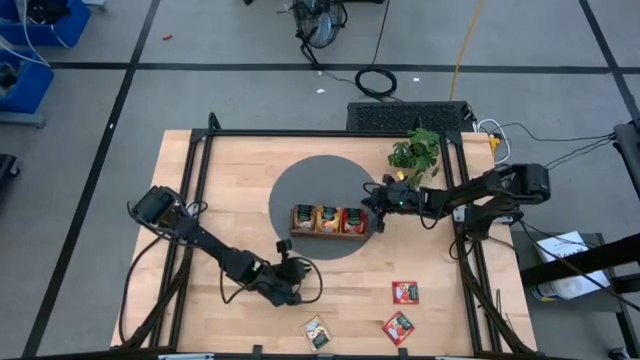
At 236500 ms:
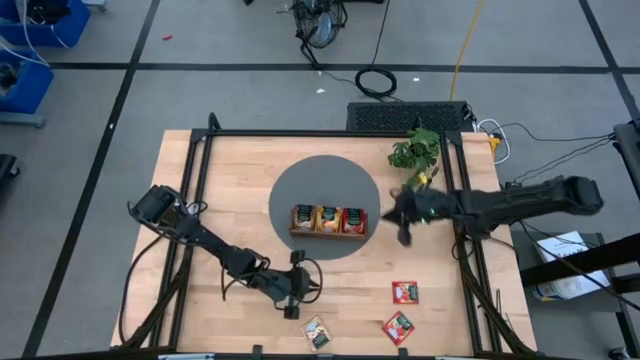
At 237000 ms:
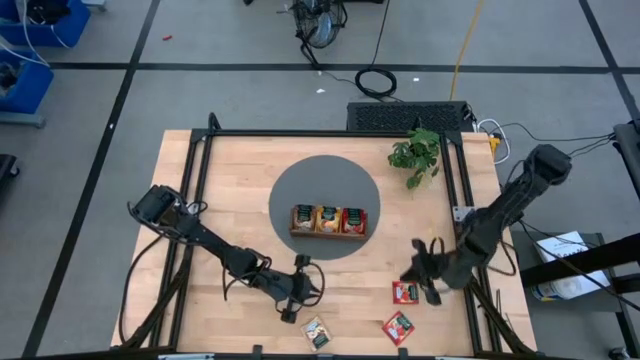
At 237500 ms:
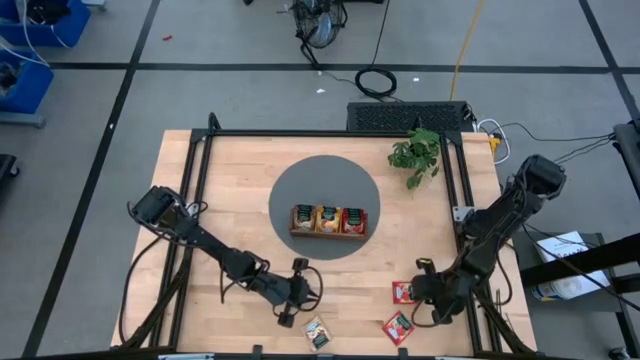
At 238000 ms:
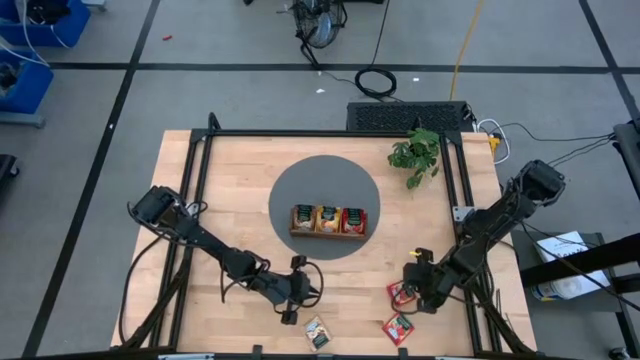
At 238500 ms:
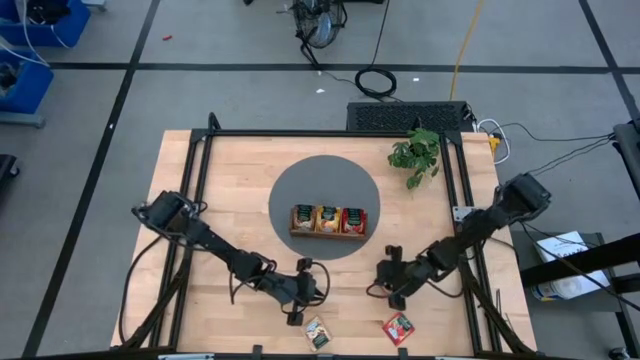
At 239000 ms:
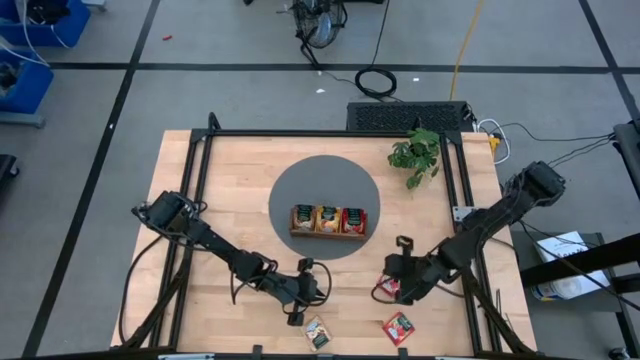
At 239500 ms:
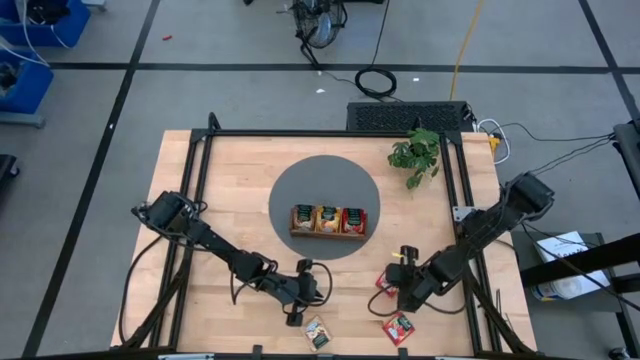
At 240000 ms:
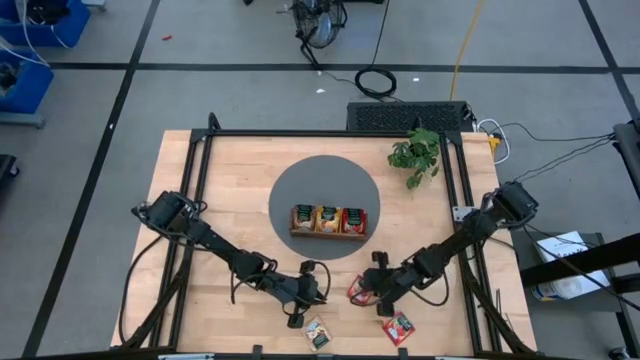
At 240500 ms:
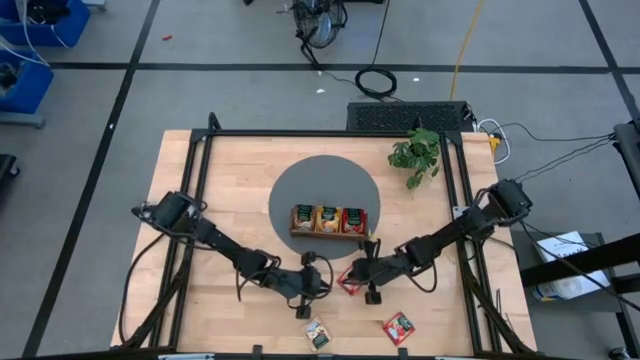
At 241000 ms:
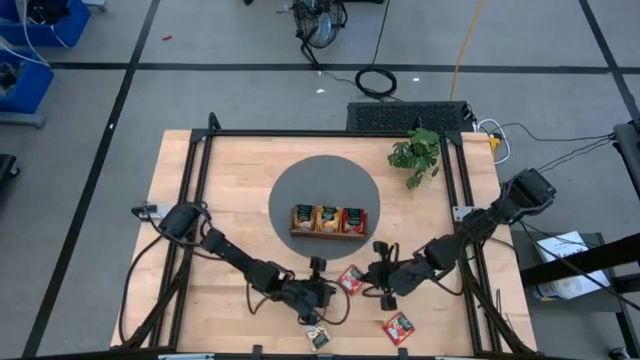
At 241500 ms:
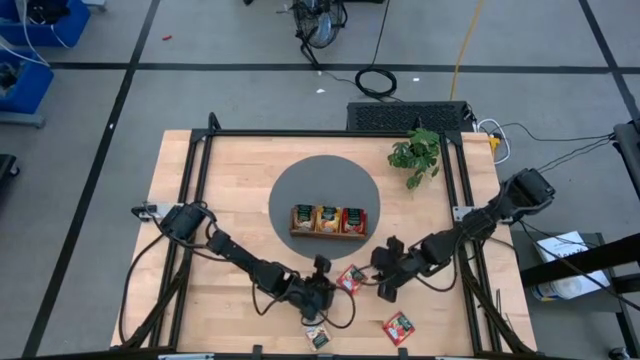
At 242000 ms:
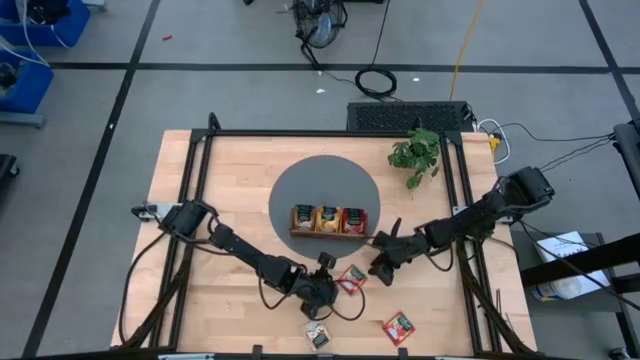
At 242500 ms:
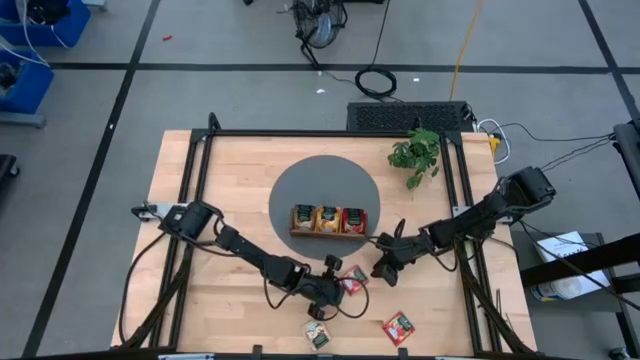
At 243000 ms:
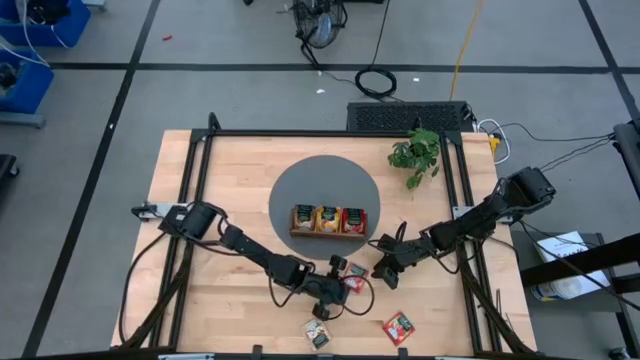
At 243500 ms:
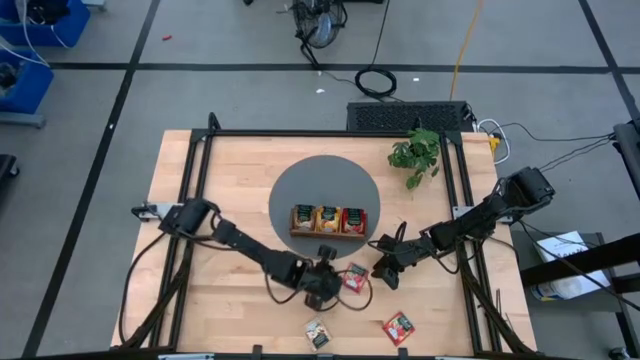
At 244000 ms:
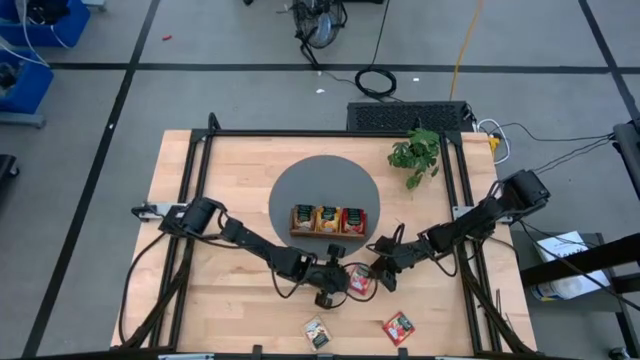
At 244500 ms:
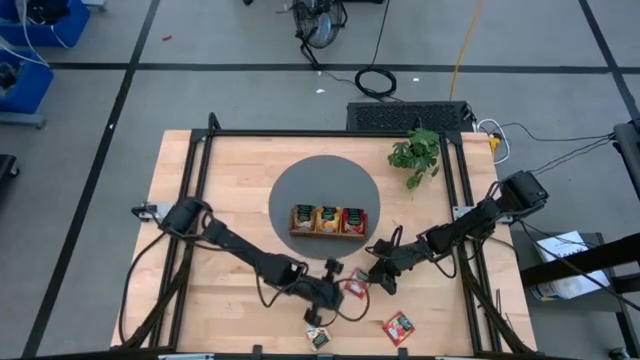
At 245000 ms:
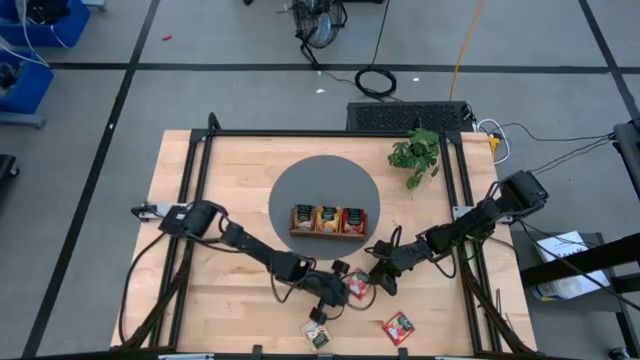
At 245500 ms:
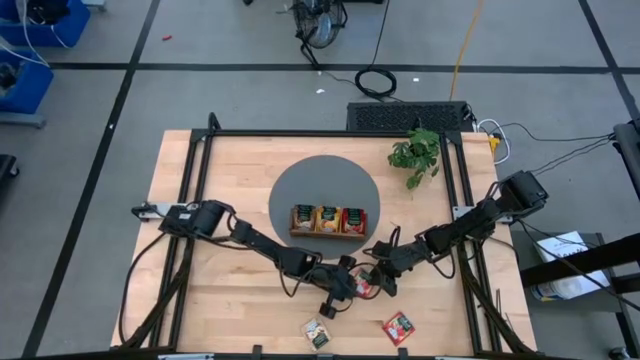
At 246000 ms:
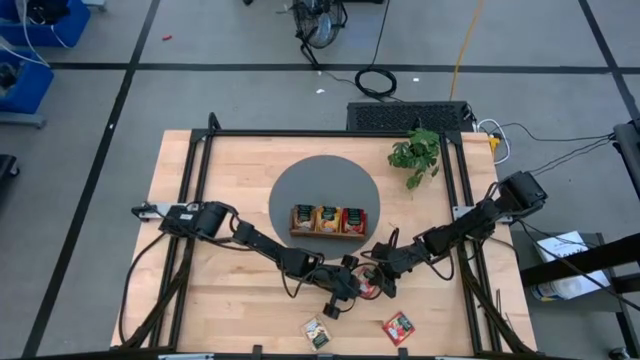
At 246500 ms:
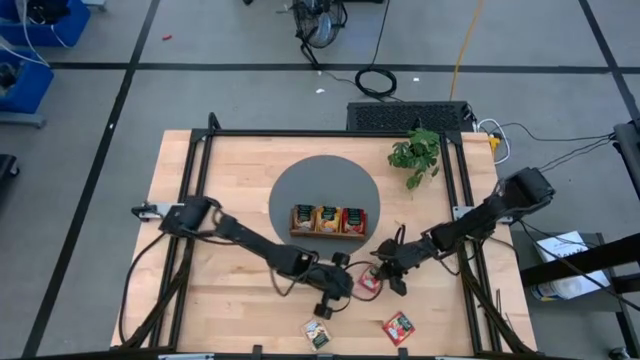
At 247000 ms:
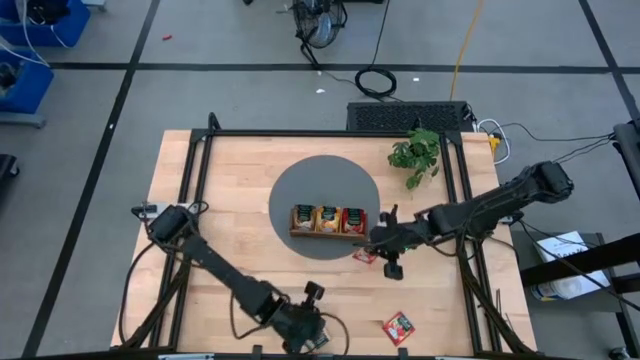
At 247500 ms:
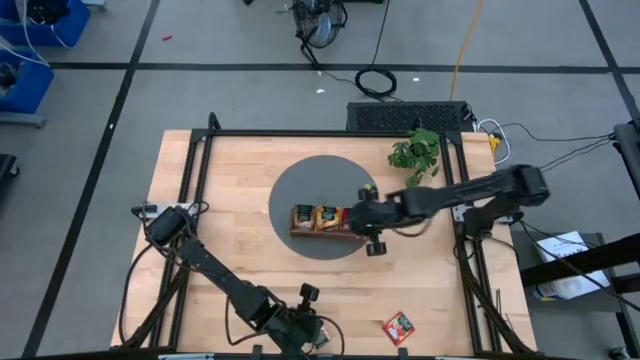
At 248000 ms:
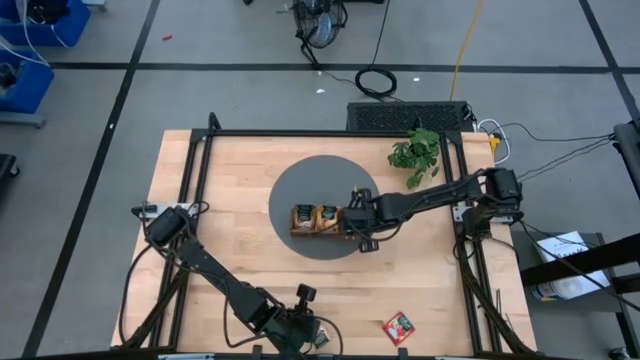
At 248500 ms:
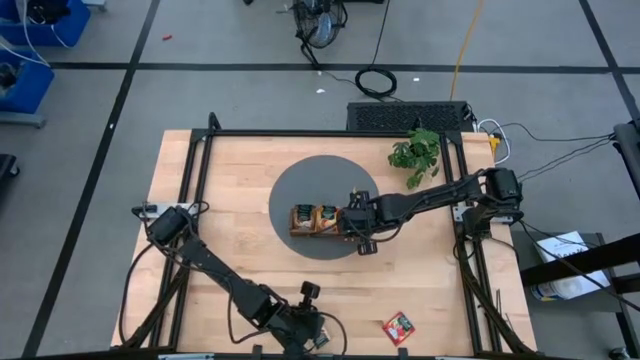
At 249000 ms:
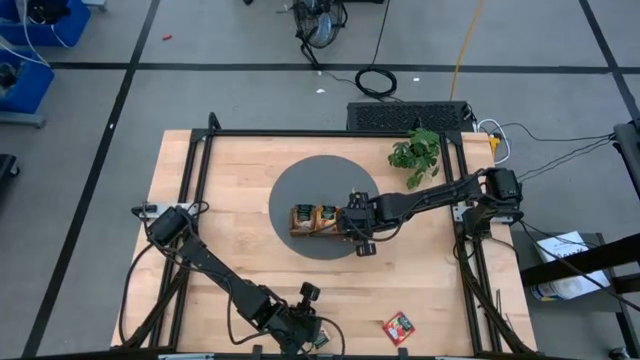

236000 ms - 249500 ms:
Task: Pick & Place Tea
Put the red tea bag into the right section of the wooden organizer

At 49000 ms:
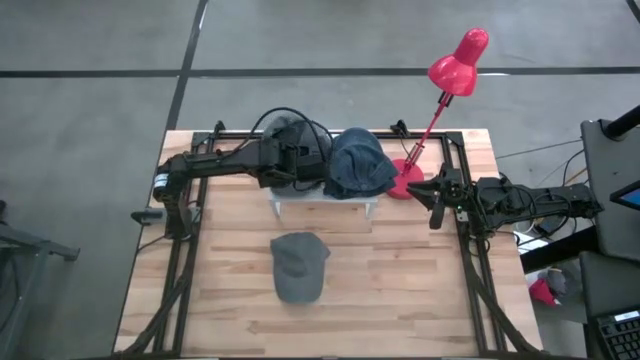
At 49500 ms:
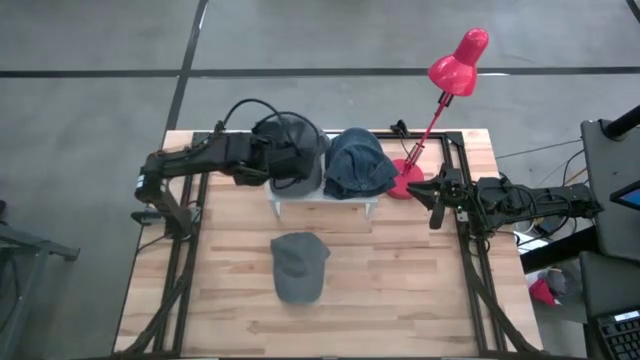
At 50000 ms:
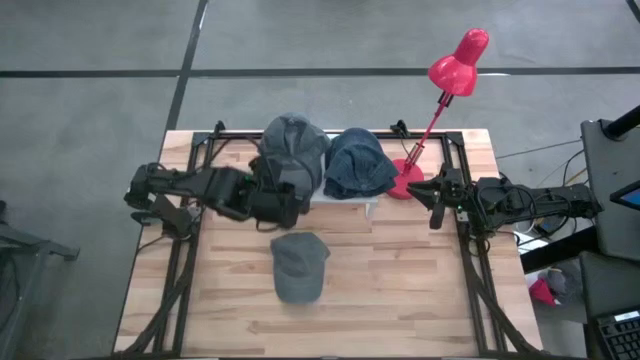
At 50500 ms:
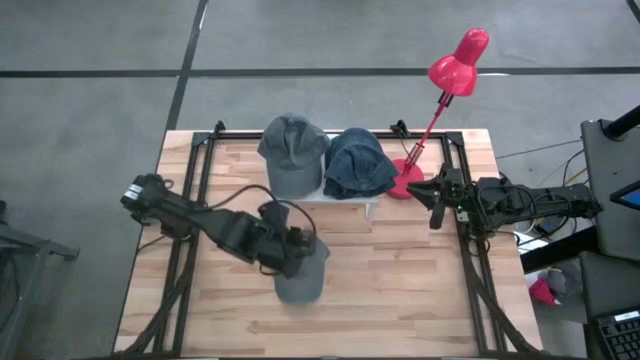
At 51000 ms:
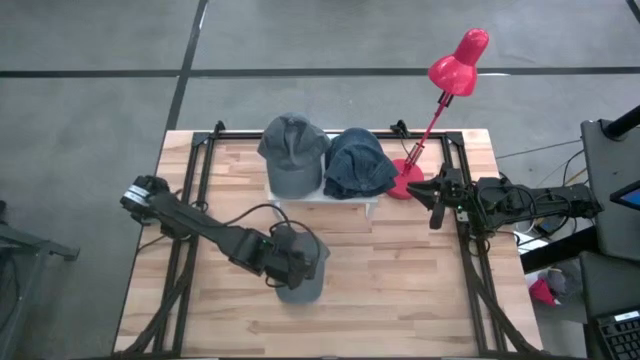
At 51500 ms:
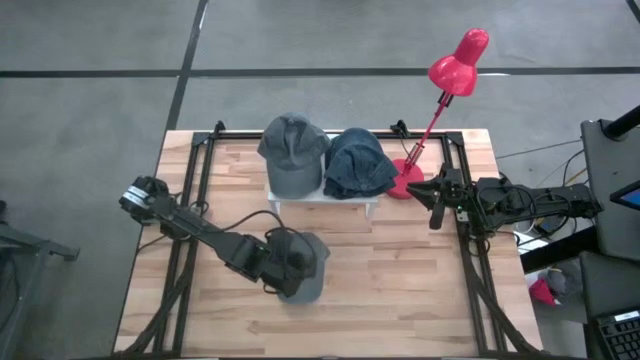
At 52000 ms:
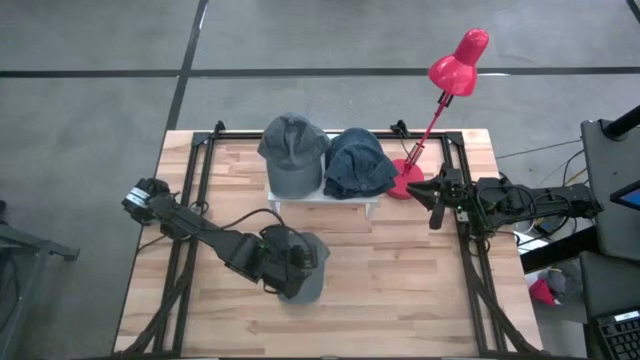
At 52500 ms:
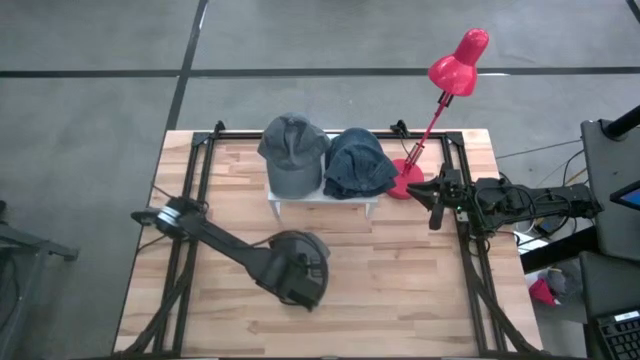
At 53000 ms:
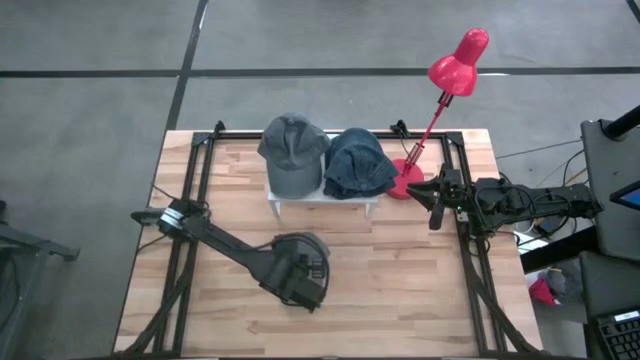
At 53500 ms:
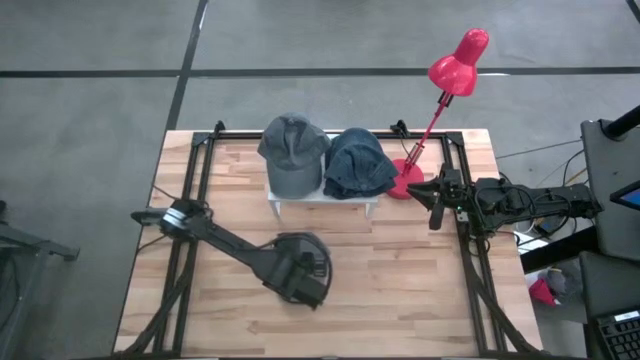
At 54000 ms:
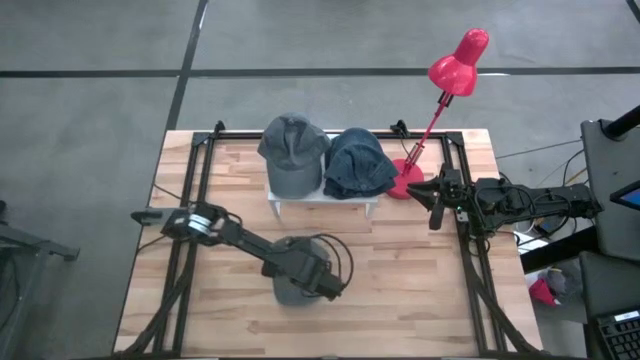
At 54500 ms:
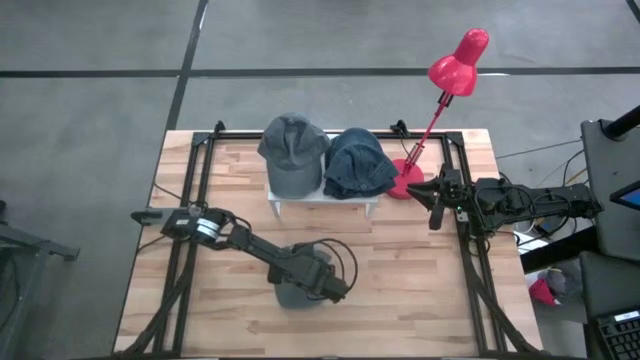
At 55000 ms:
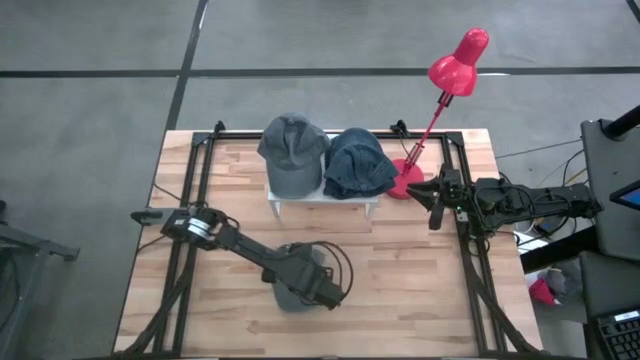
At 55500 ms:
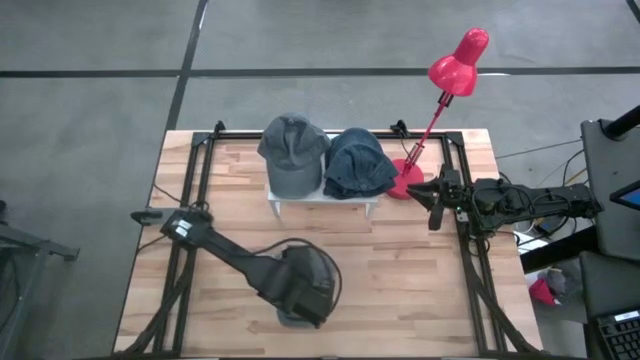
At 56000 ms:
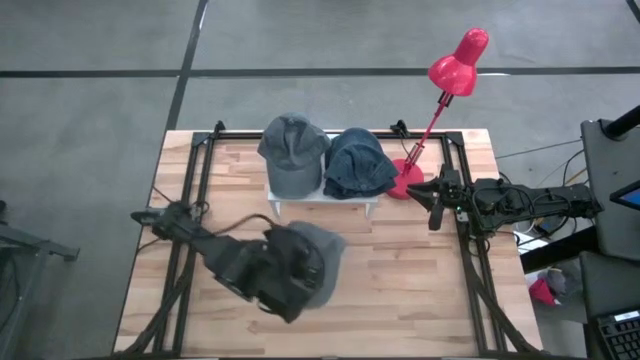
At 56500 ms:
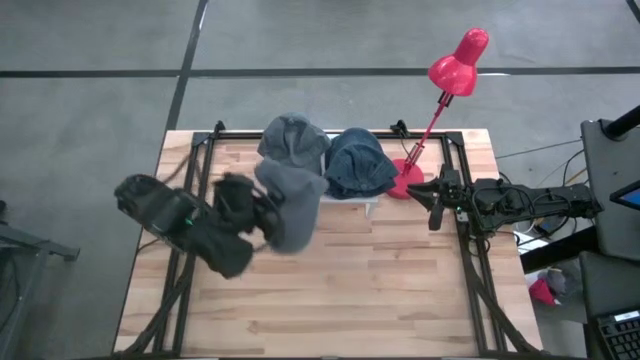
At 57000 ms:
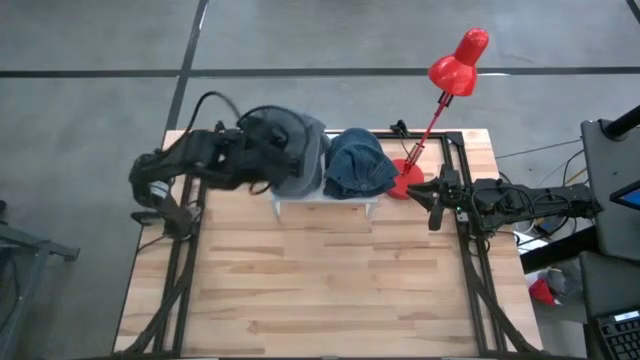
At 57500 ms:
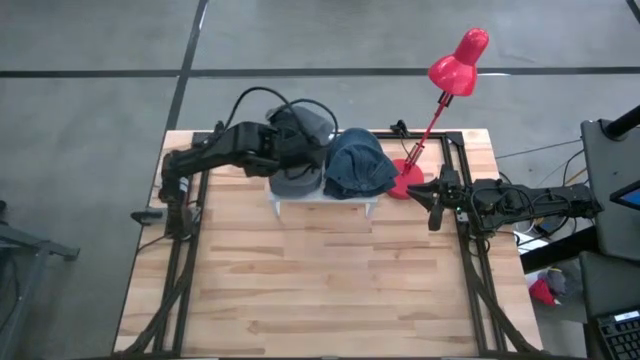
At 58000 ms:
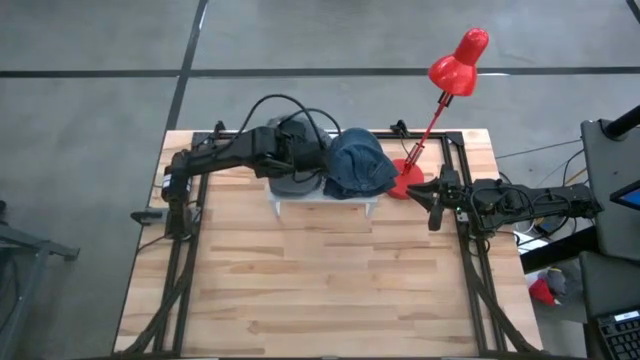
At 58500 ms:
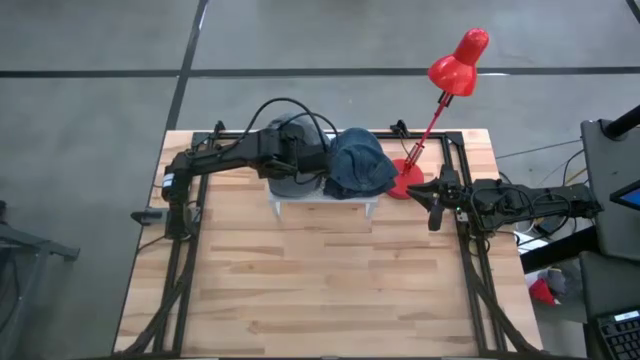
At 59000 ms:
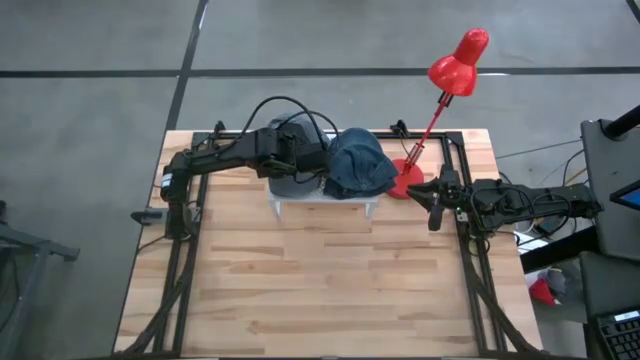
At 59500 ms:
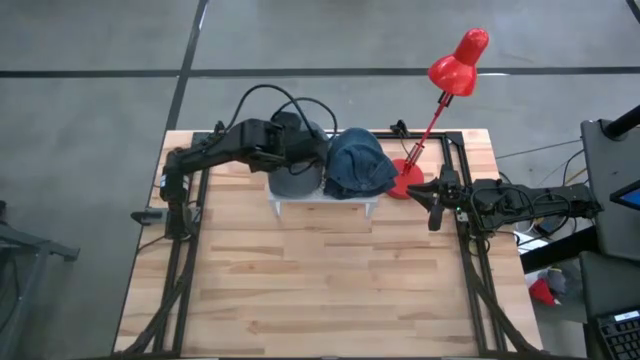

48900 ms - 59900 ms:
Task: Pick & Place hat
Stack the gray cap on the other gray cap on the shelf
